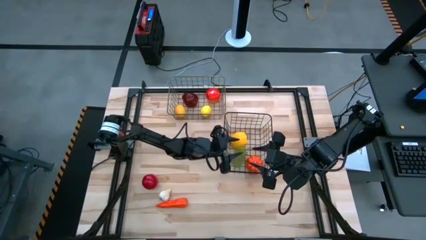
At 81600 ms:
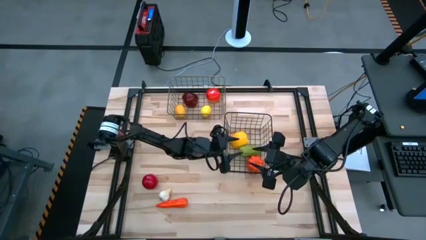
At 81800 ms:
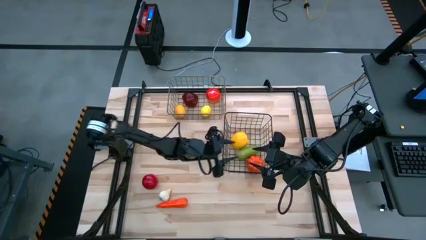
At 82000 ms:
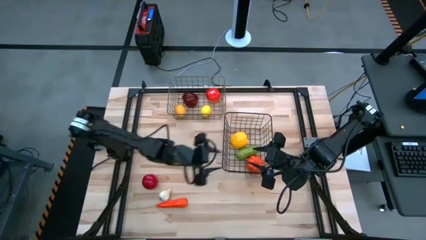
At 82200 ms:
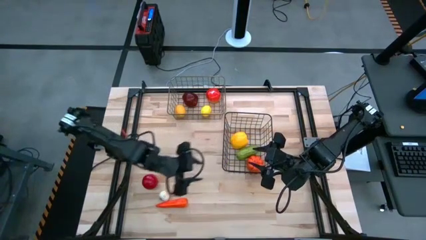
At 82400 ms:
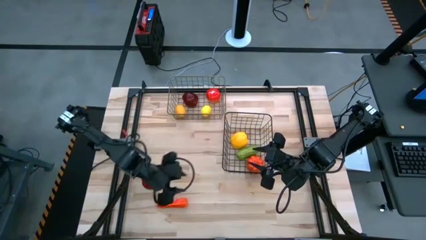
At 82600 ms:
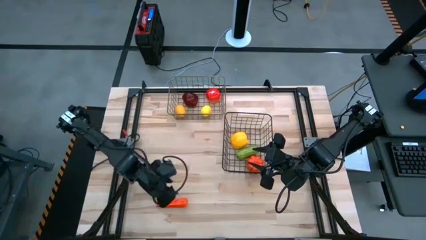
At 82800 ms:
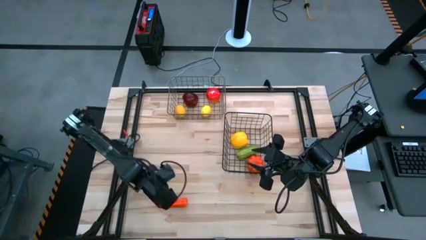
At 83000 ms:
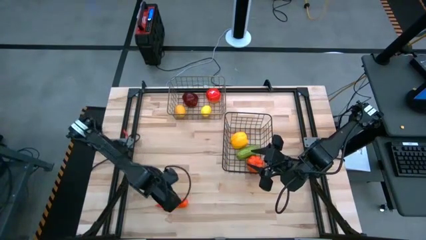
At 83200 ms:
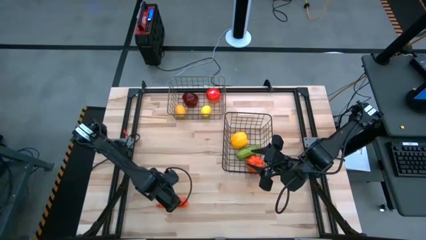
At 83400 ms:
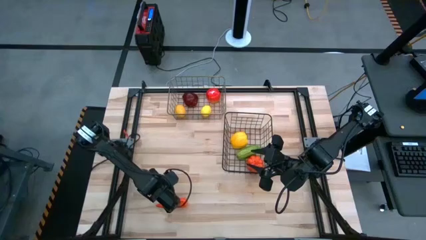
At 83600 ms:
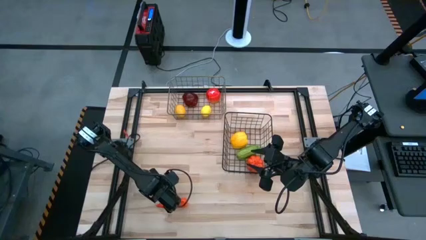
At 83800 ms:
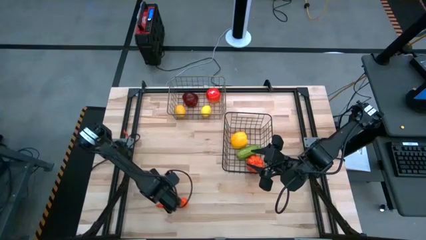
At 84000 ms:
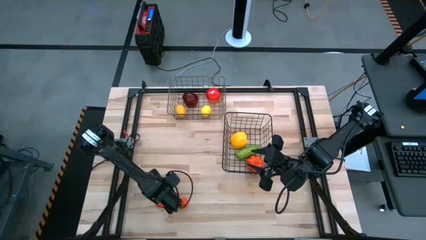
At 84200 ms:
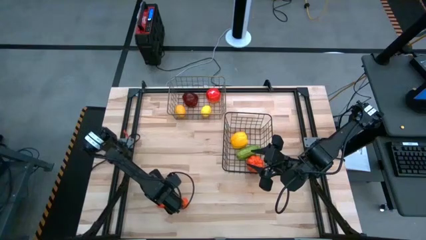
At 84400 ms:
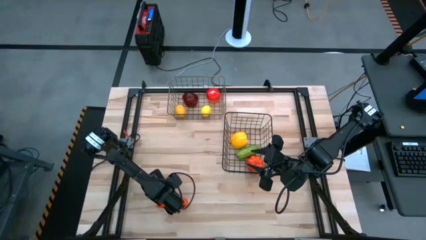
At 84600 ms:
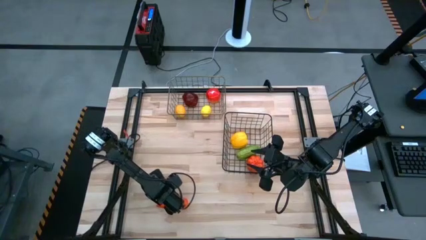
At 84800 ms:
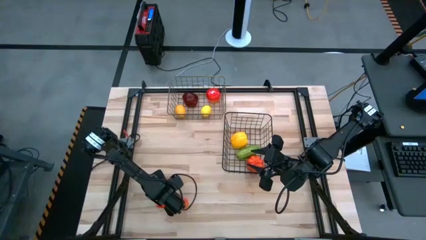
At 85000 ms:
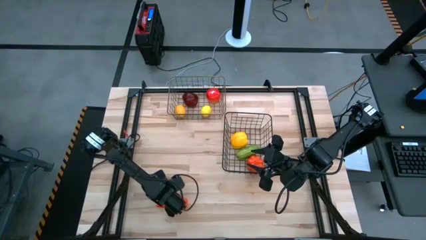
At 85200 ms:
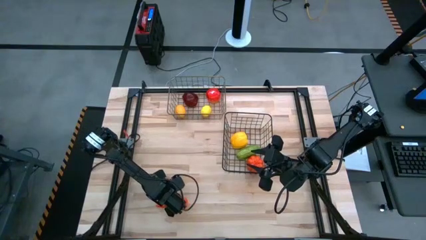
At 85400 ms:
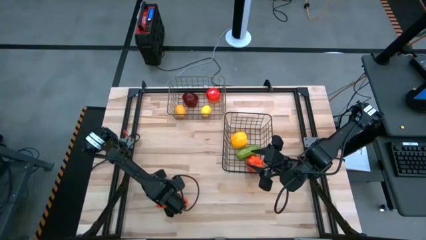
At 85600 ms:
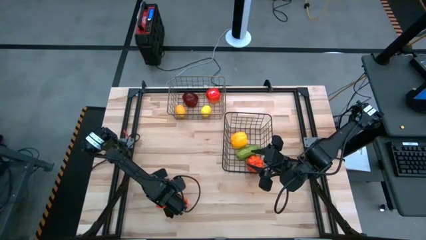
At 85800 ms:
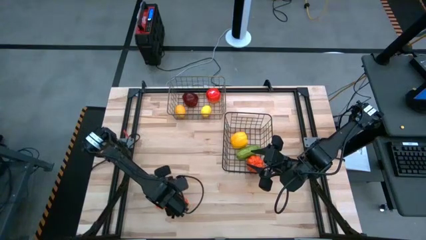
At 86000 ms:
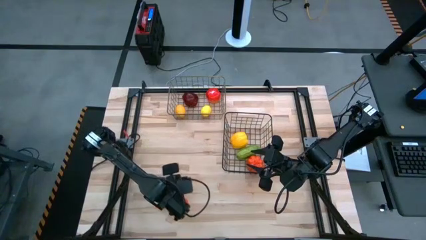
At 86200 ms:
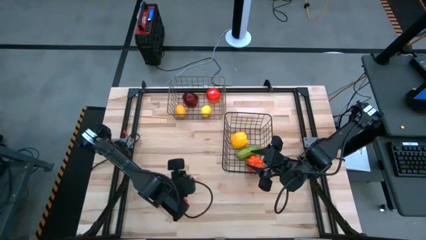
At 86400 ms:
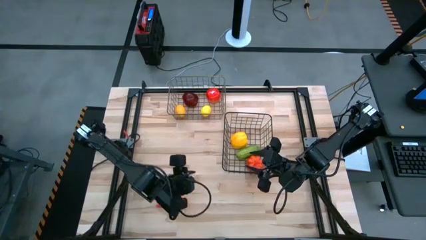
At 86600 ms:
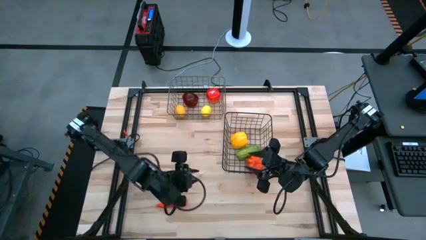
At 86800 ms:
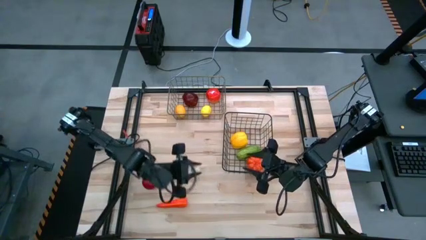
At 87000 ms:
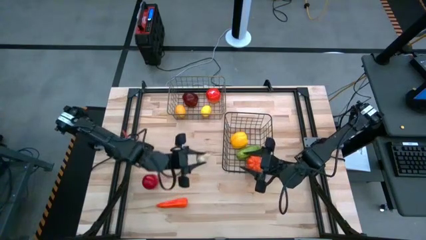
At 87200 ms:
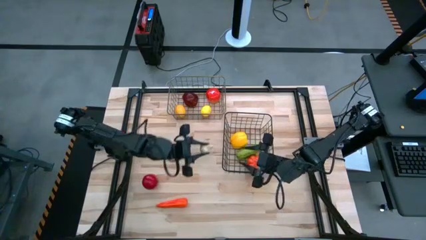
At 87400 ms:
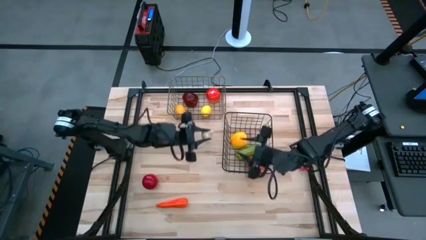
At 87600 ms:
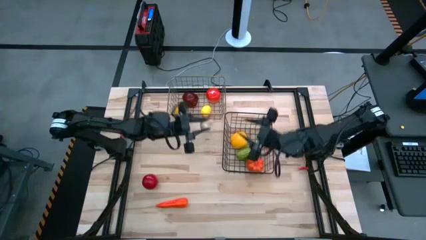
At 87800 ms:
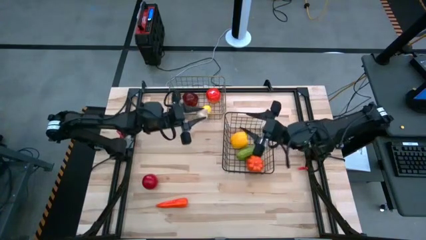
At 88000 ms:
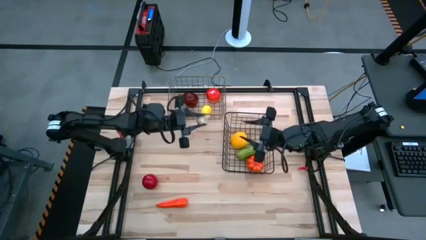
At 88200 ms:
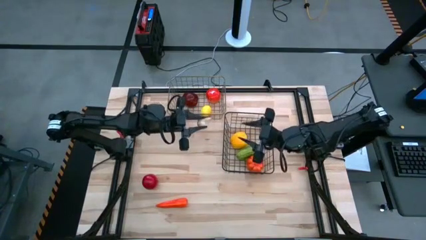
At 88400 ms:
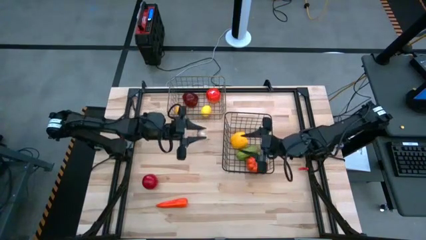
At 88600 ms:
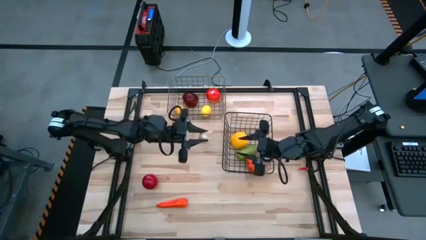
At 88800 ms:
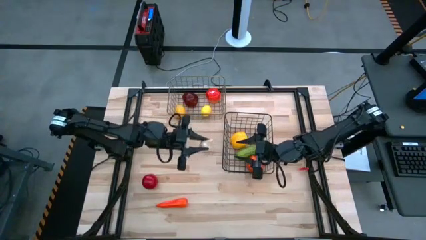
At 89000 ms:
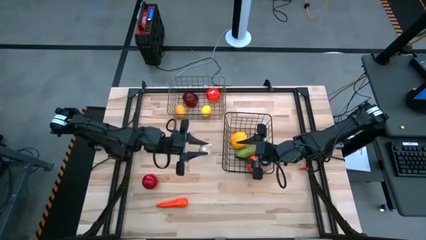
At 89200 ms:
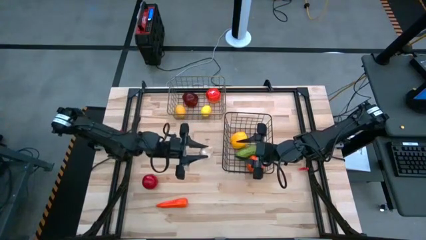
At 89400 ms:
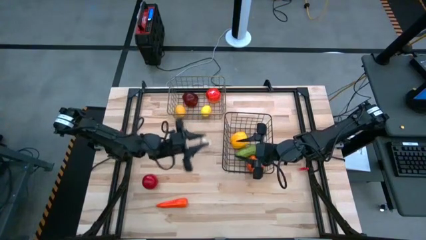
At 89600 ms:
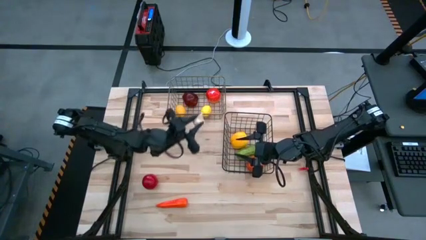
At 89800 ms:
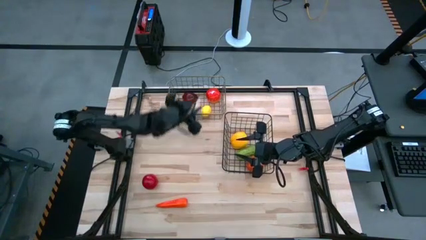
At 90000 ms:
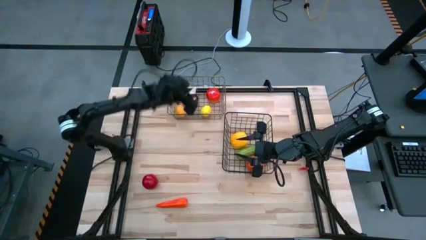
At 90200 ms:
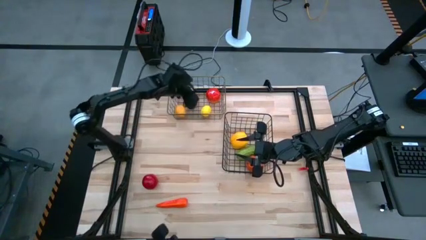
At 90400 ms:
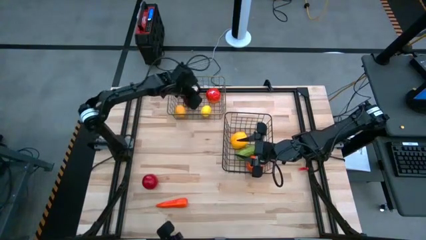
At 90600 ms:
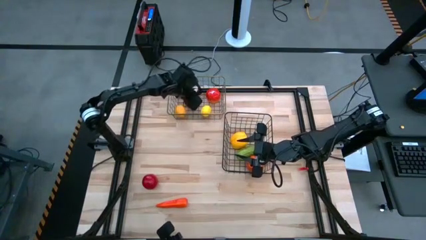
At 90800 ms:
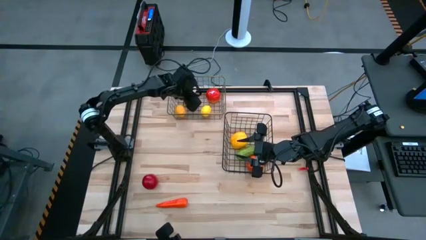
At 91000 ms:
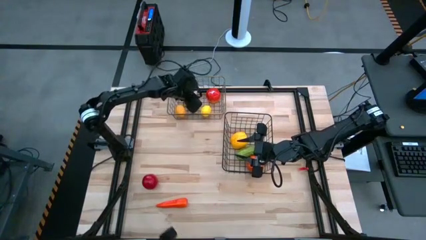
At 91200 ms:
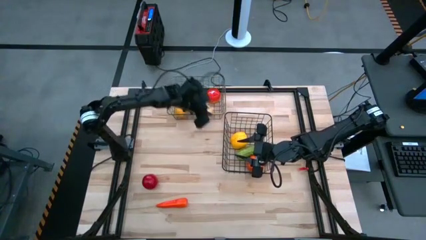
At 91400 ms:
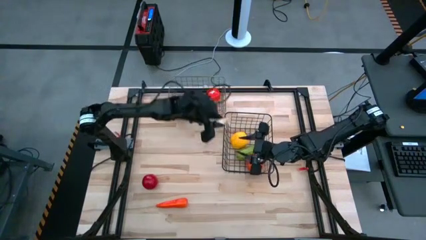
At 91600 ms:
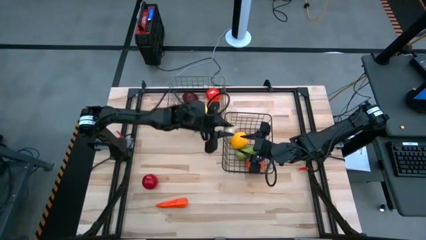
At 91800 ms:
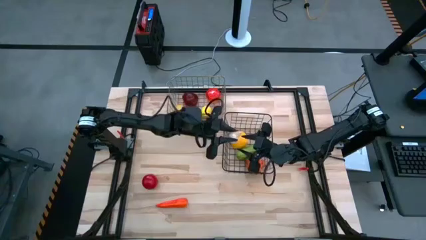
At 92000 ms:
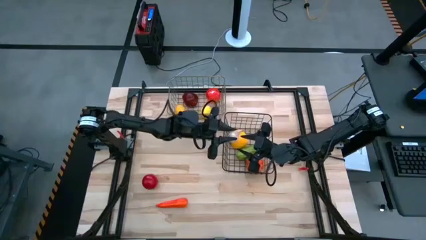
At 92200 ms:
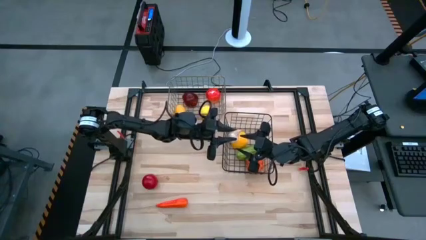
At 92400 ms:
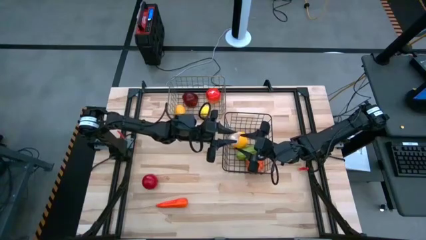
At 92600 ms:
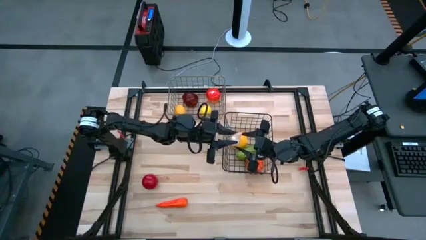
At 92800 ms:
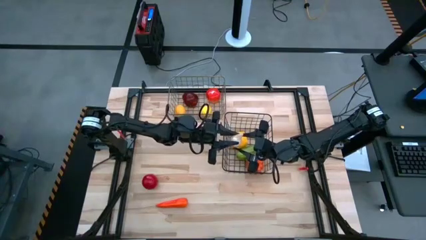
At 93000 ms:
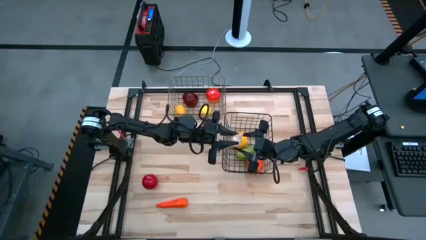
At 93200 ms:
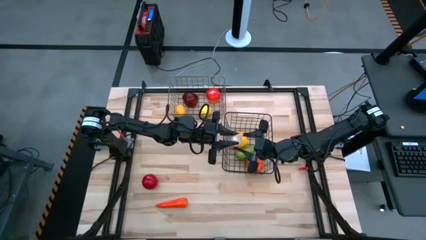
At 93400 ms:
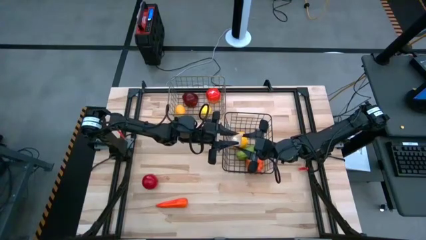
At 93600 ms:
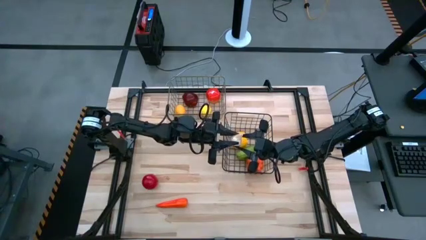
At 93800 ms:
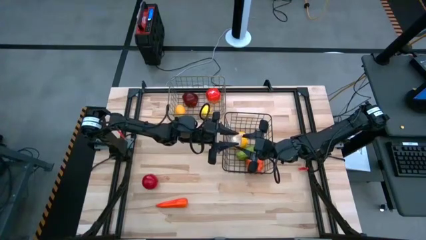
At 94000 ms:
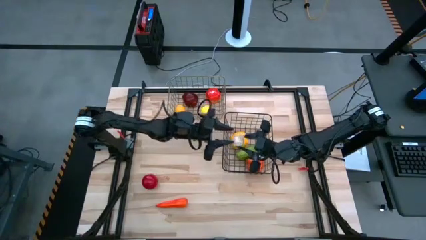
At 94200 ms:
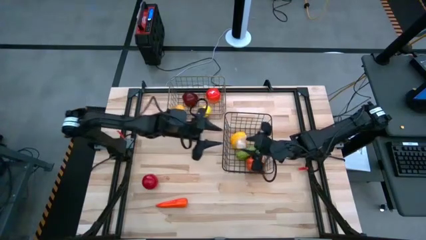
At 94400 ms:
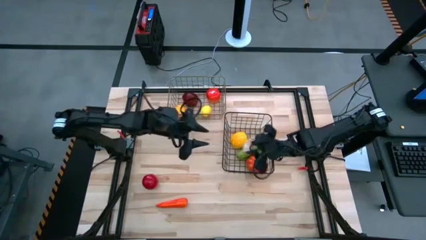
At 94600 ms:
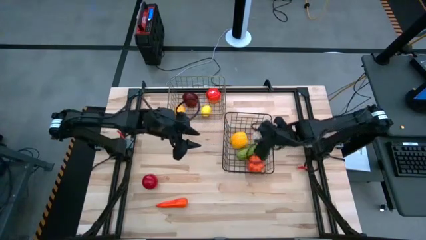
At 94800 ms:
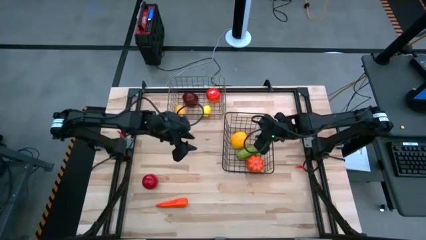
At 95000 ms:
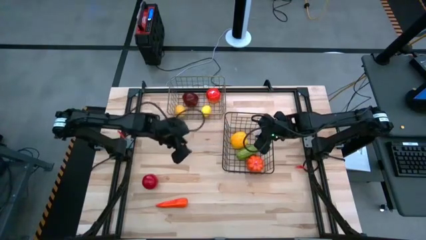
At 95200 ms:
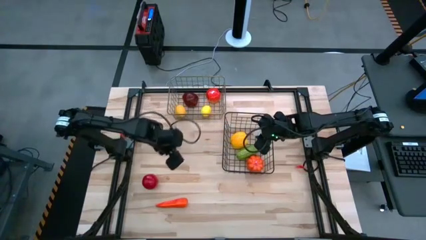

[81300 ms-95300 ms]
Task: Sort produce into baskets
Put the white garlic into the black wire basket

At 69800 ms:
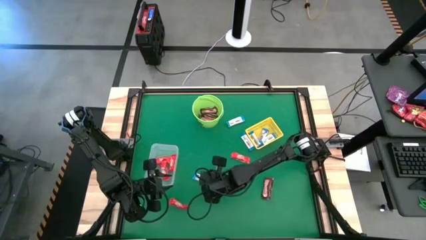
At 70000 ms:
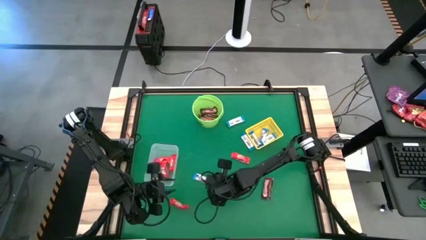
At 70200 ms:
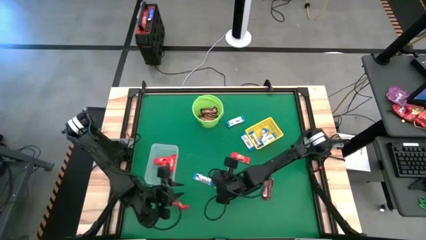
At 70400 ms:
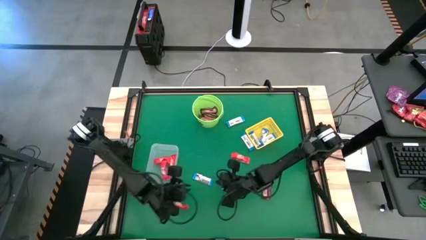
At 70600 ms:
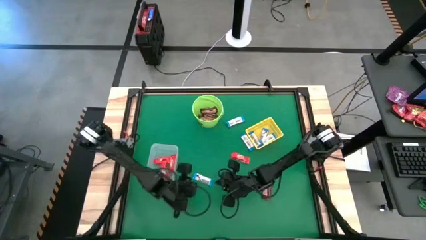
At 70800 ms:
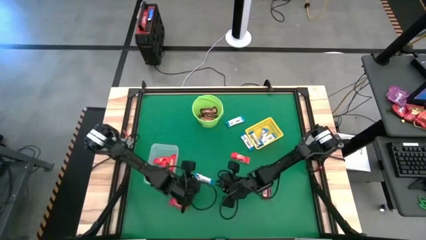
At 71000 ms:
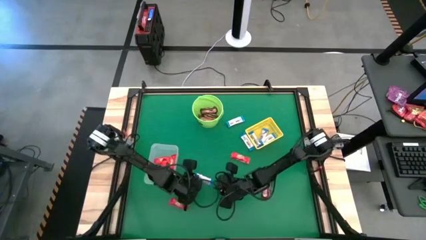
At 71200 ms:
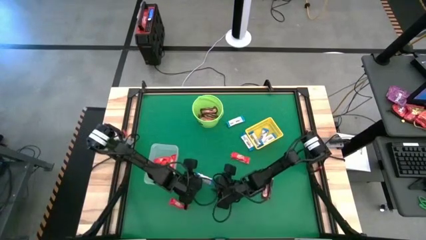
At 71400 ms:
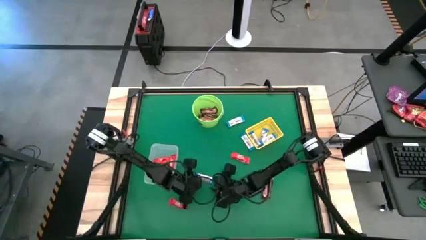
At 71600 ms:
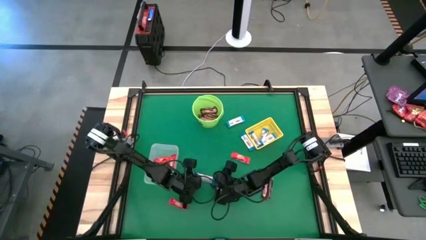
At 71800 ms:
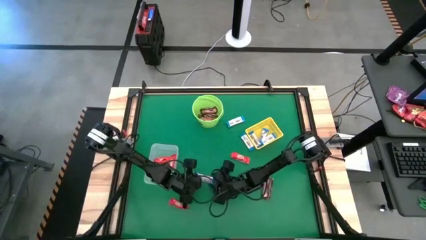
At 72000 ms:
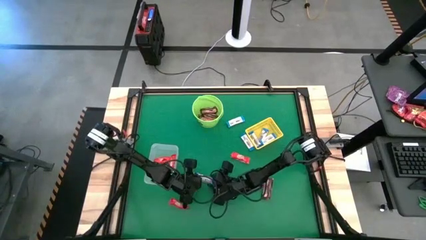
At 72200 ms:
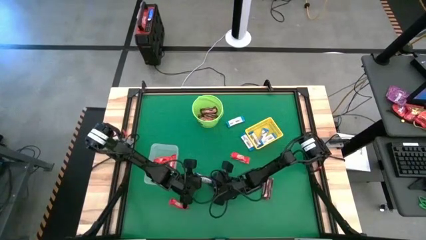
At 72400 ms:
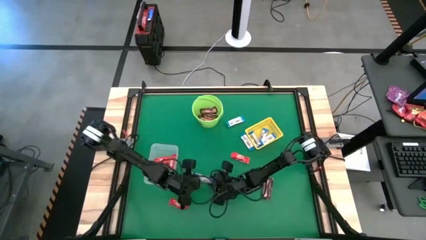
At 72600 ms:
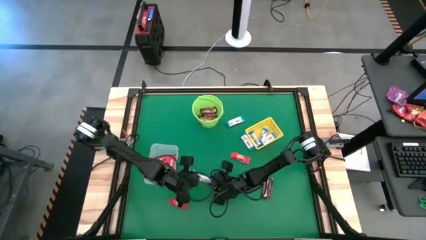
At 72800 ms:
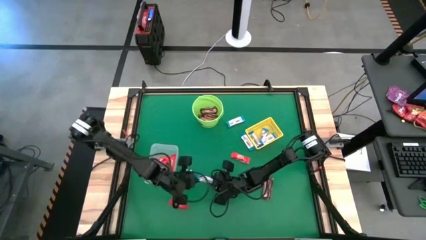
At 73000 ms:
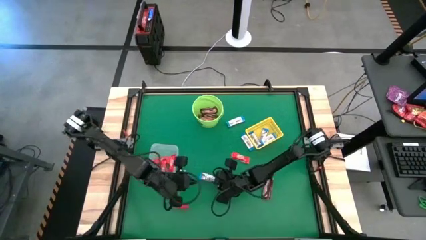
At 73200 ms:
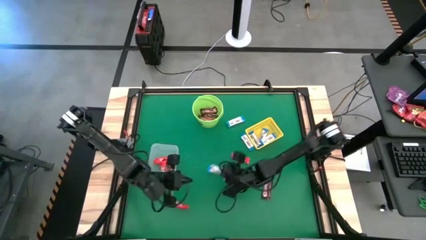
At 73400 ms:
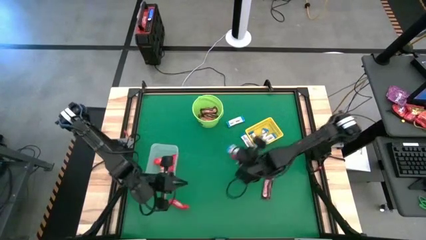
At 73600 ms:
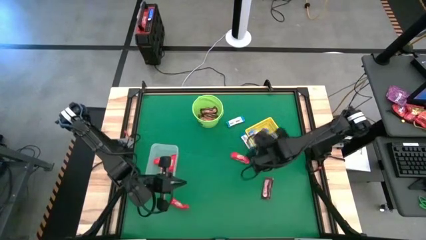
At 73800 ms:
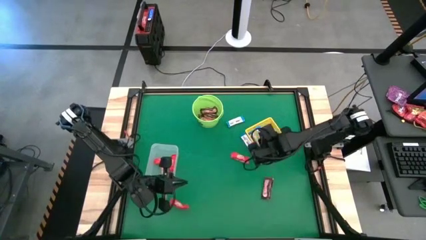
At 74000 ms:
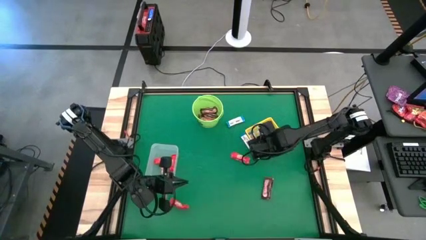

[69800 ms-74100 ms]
Task: Sort candy by brand, put in halloween buckets
Put the white chocolate bar into the yellow bin
